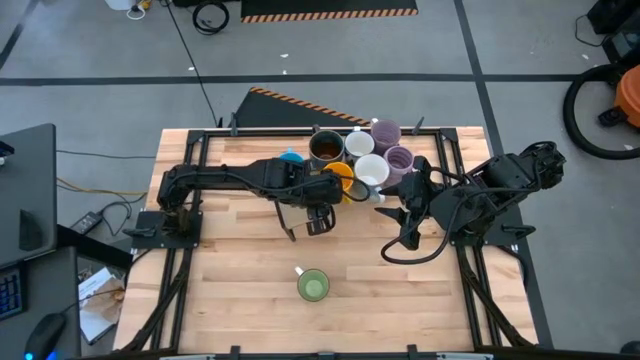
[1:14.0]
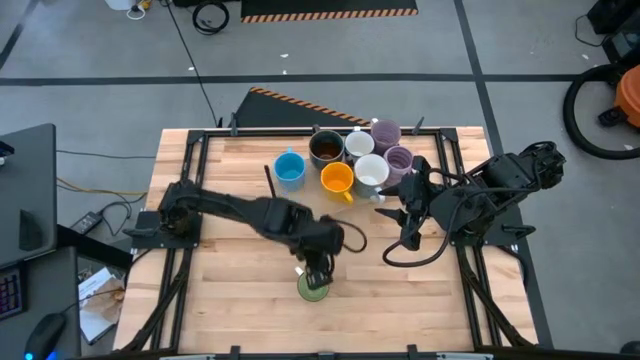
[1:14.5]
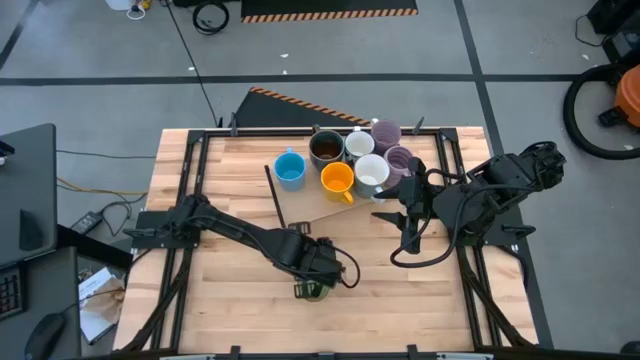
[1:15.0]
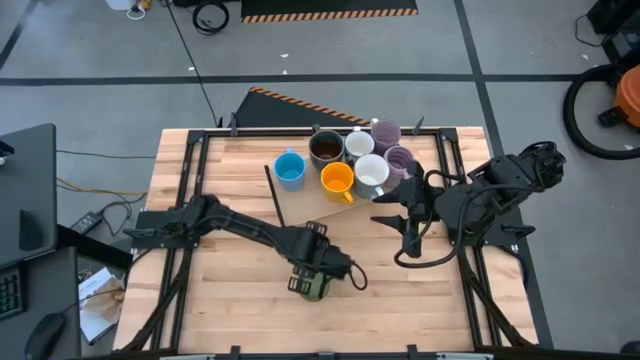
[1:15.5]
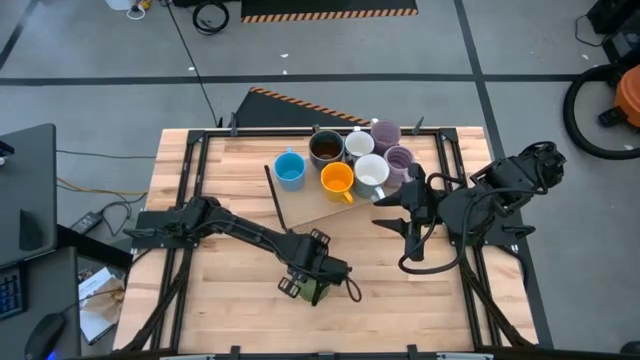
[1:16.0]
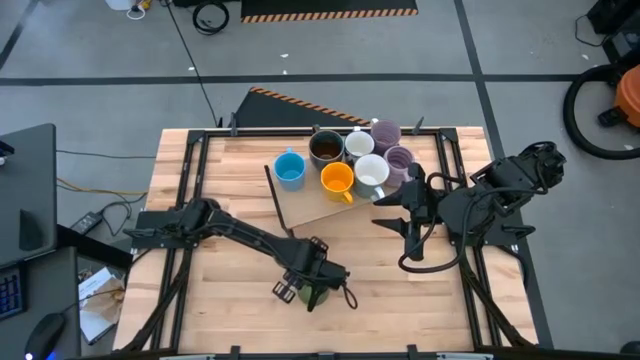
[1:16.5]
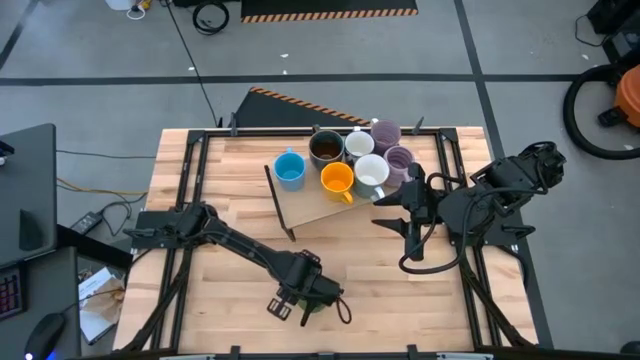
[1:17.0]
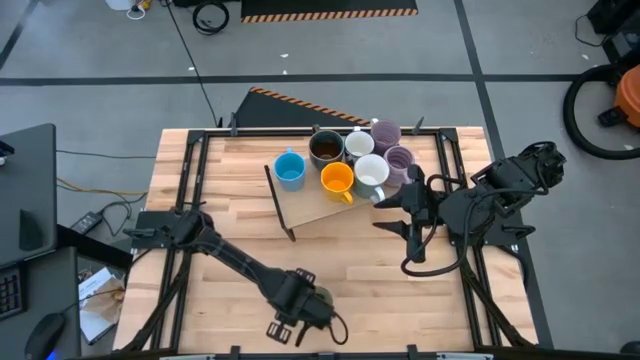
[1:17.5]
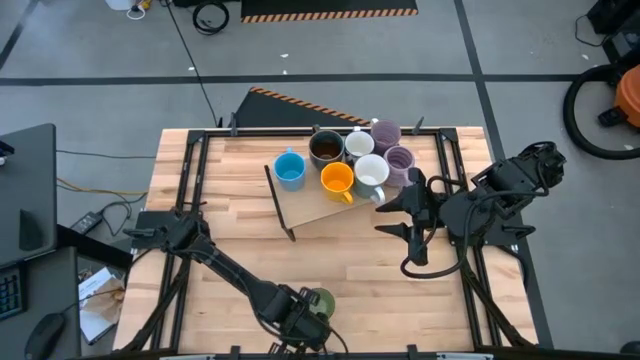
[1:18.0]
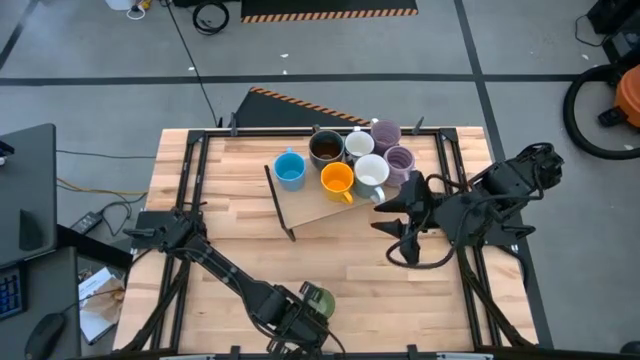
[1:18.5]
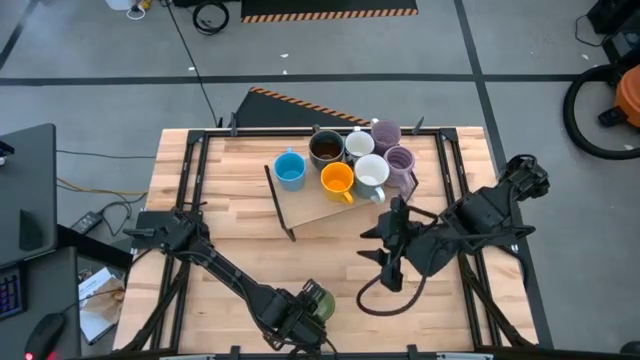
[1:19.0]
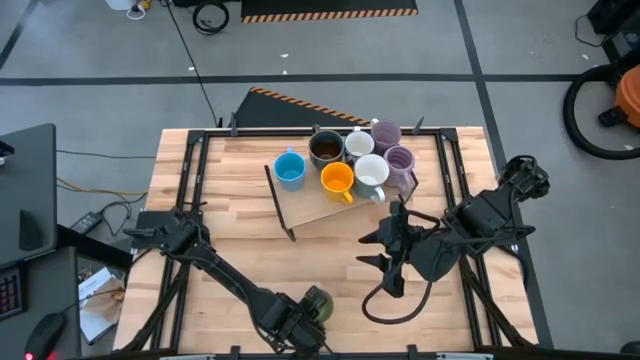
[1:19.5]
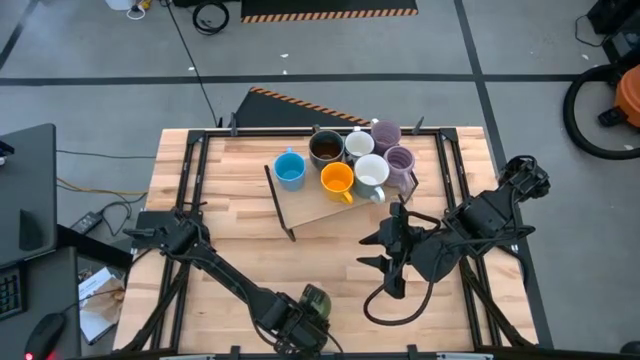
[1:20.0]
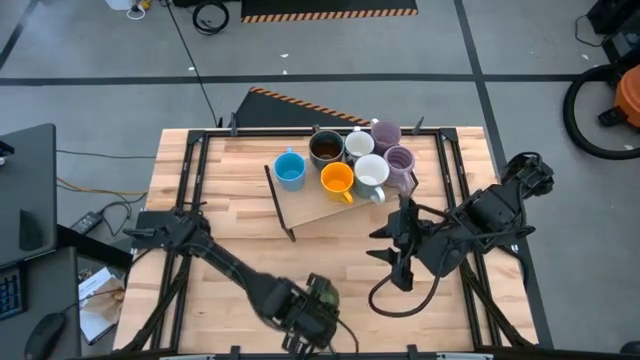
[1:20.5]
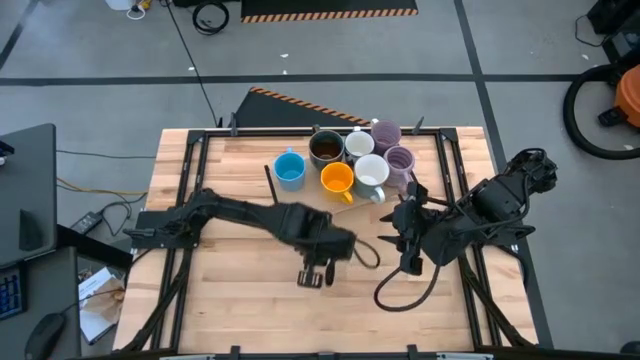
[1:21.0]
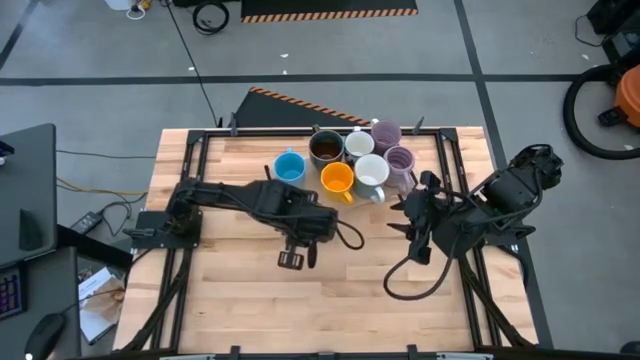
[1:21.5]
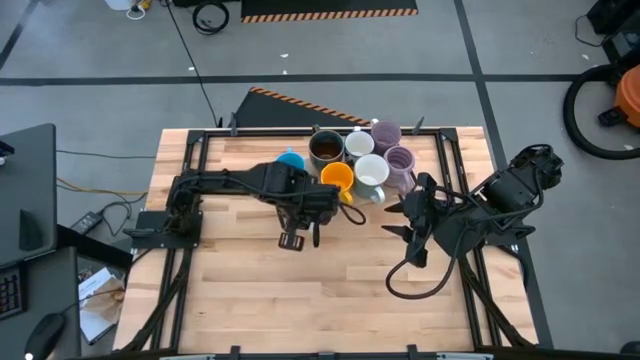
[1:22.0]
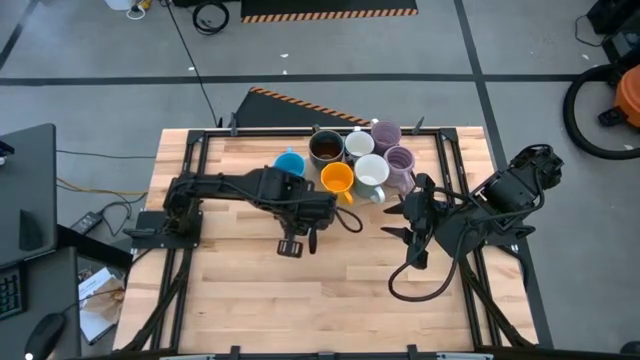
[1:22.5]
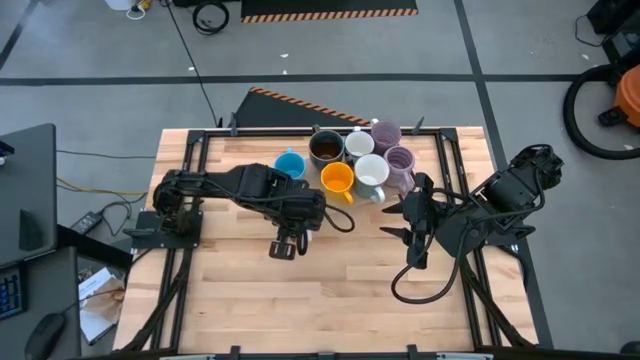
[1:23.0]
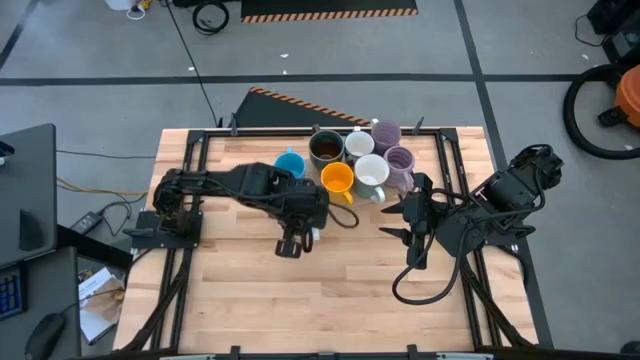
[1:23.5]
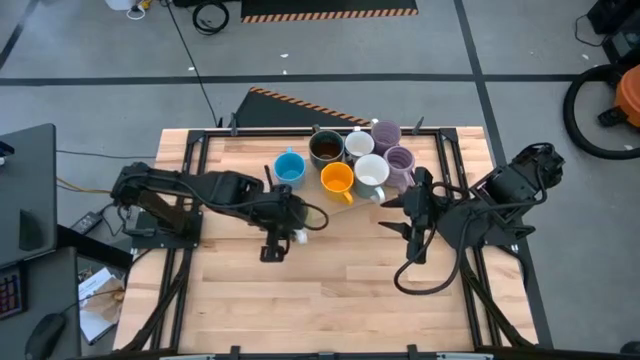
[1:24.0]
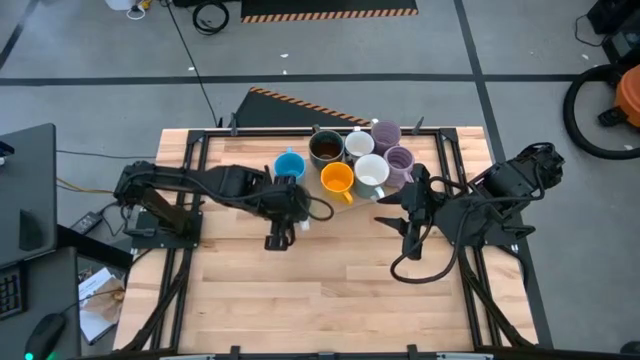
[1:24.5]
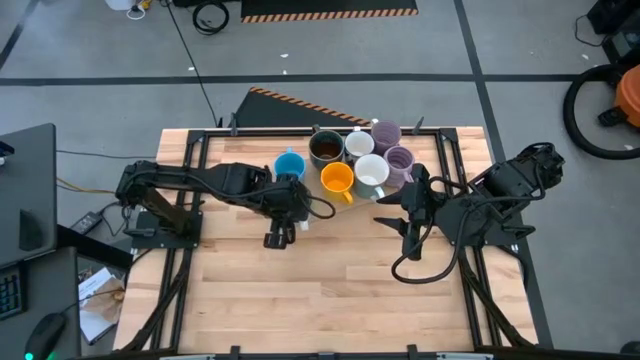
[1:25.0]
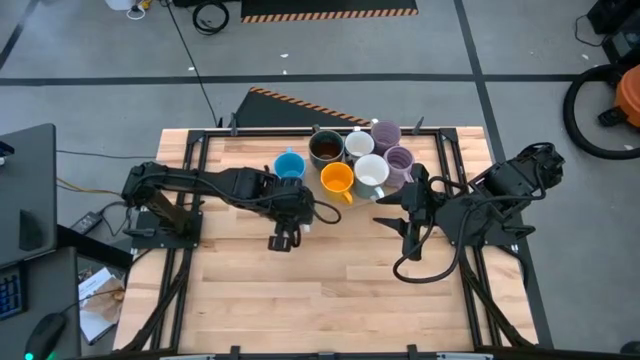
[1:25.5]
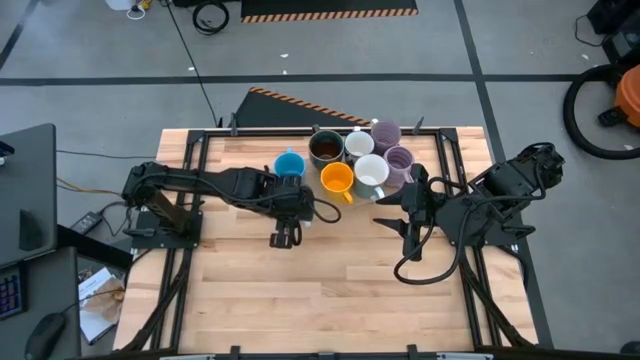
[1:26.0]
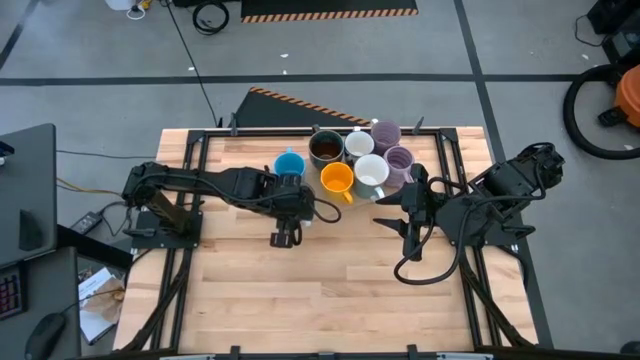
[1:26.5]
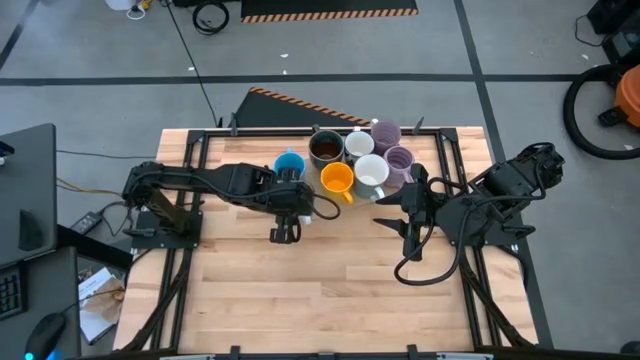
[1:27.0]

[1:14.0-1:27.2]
Task: Place coffee mugs
Put the green mug on the shelf

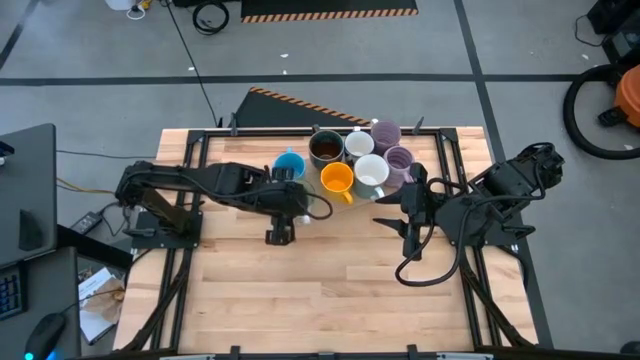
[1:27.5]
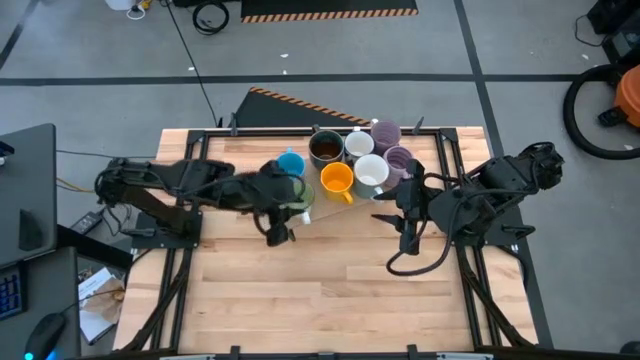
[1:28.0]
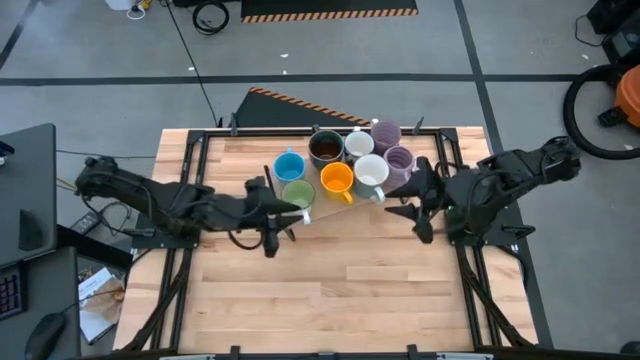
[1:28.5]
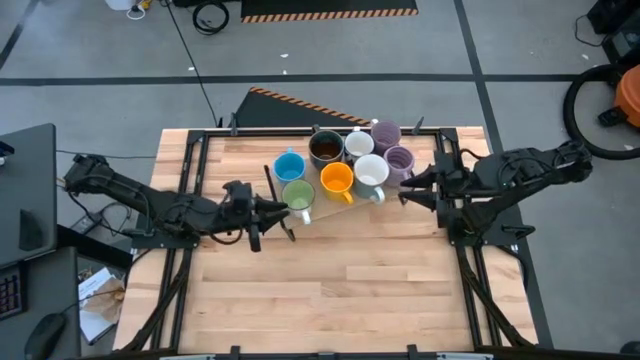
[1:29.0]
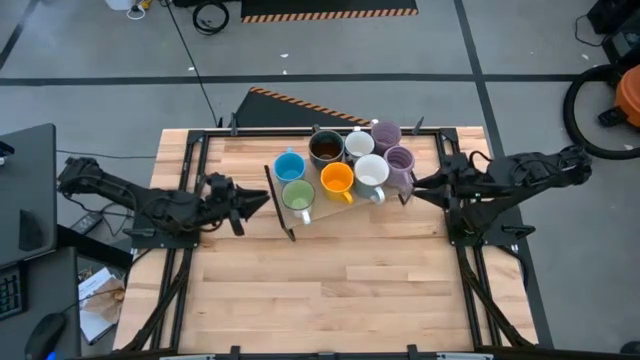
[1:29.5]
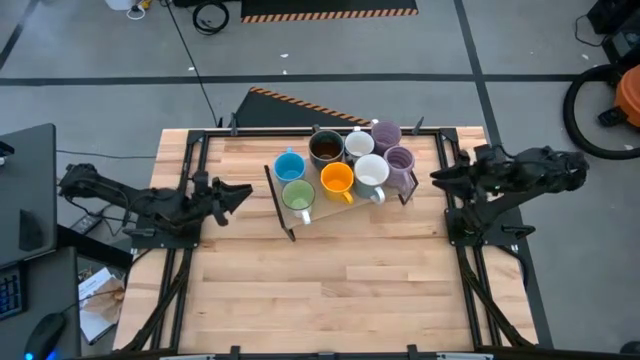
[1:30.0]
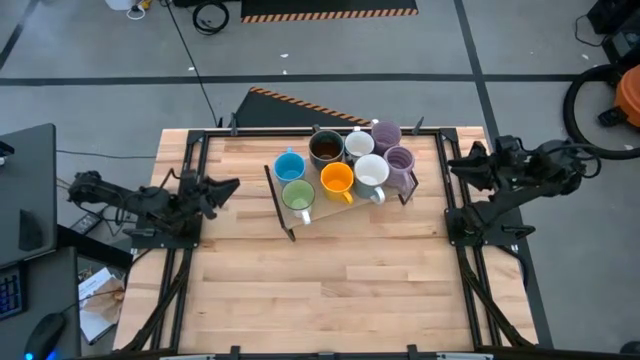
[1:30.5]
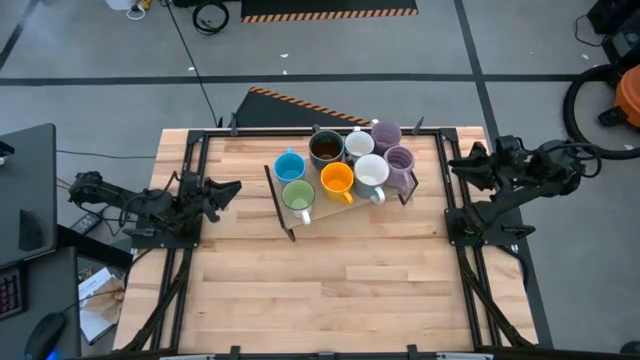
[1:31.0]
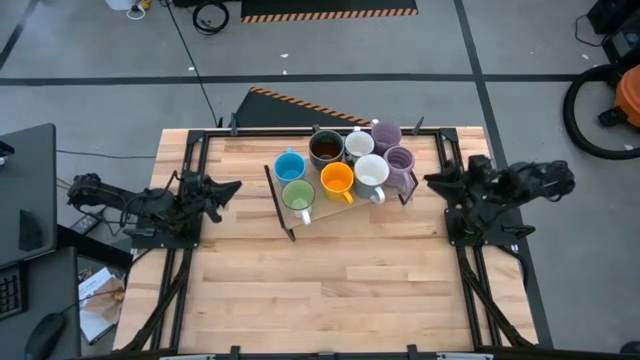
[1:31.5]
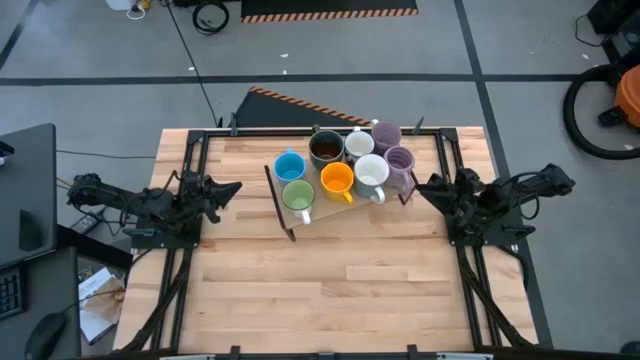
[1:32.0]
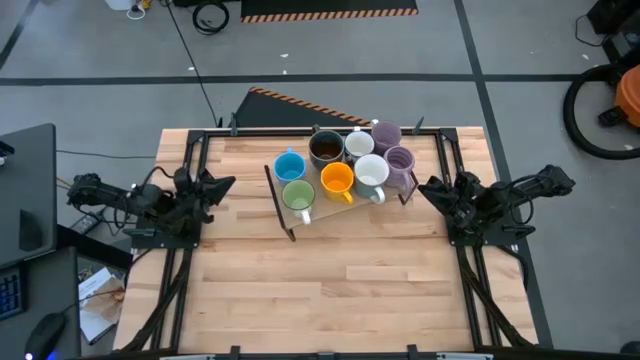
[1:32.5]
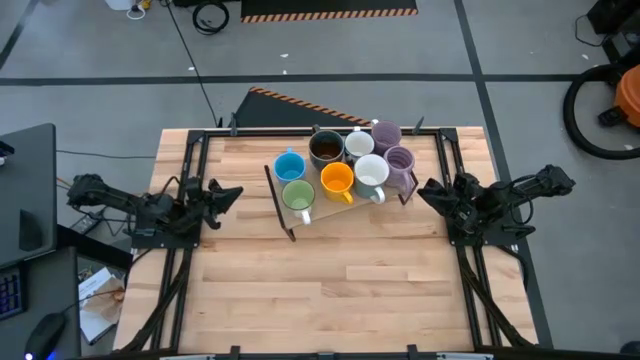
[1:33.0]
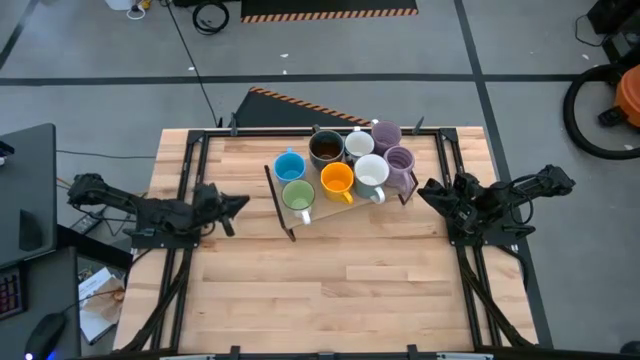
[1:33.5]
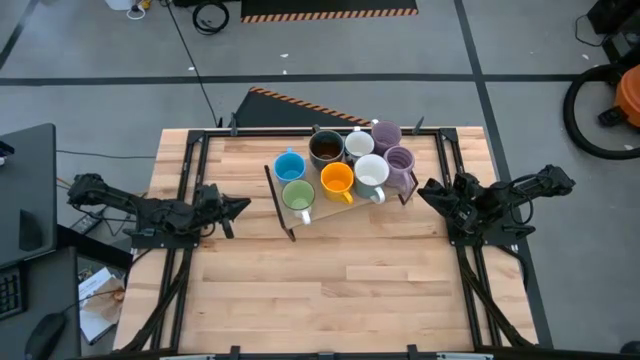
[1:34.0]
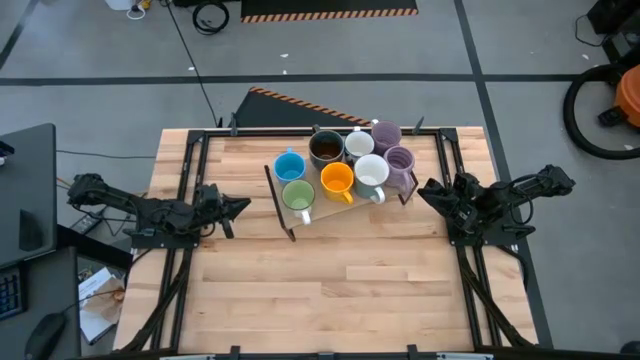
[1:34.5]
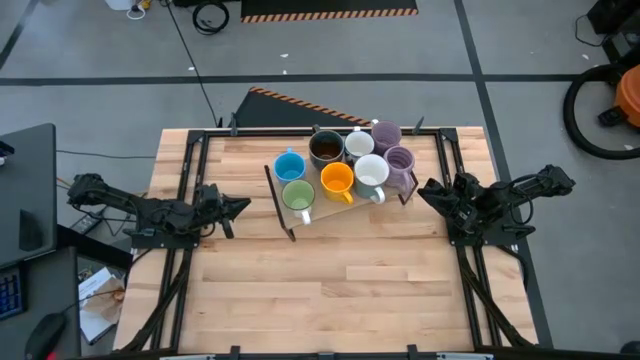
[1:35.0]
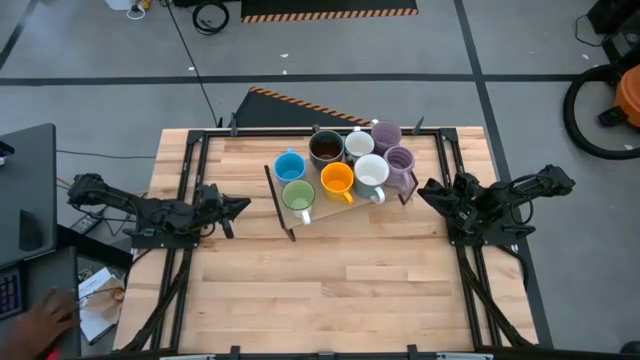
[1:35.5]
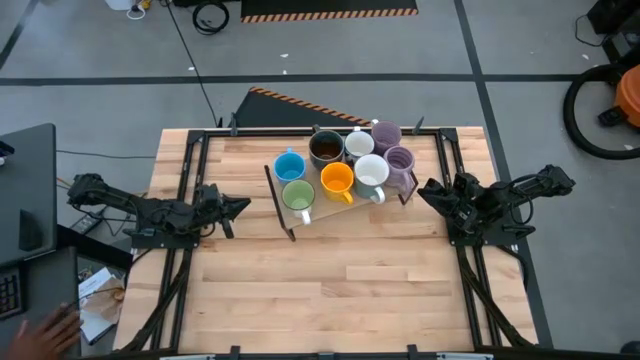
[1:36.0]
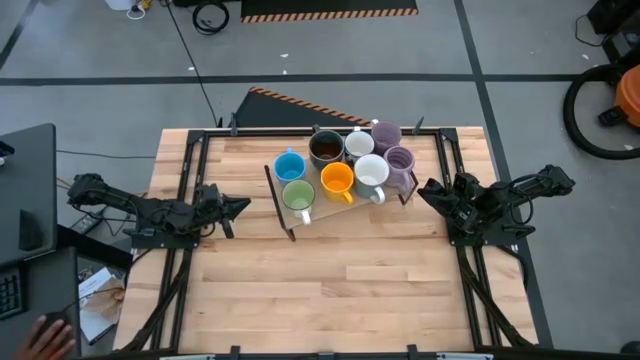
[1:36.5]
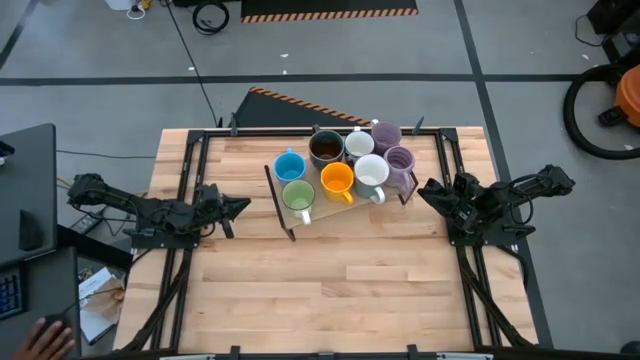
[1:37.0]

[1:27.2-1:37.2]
Return to Home Position
